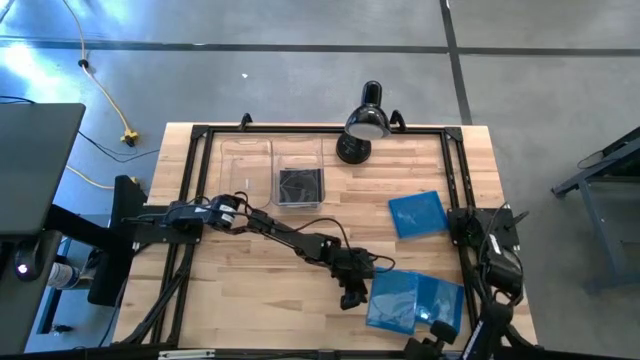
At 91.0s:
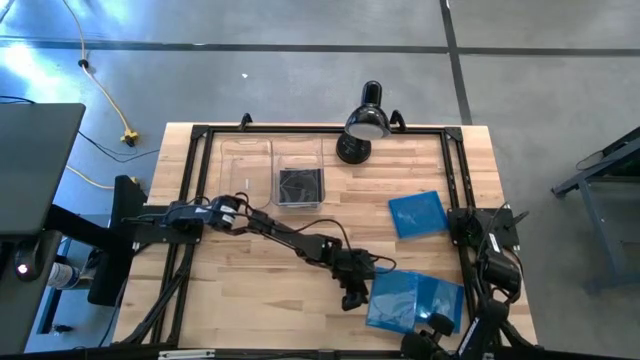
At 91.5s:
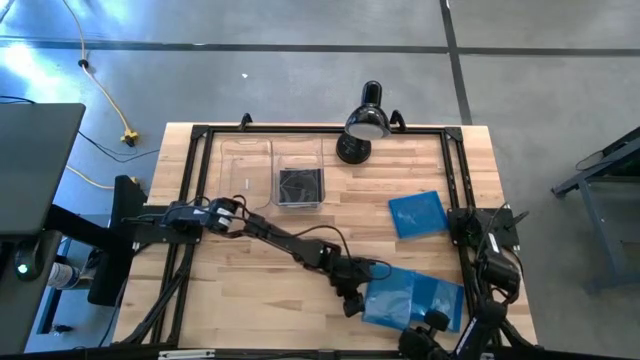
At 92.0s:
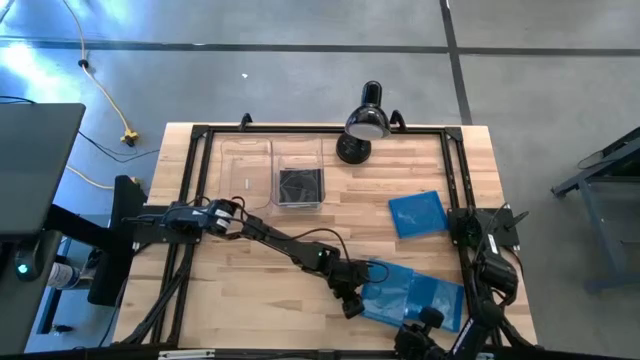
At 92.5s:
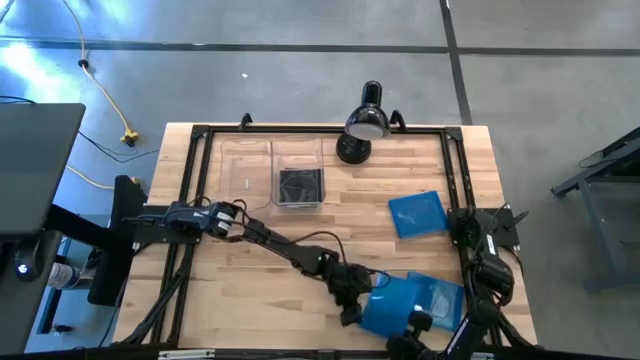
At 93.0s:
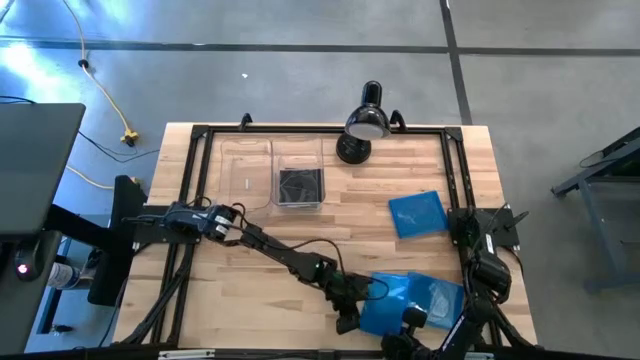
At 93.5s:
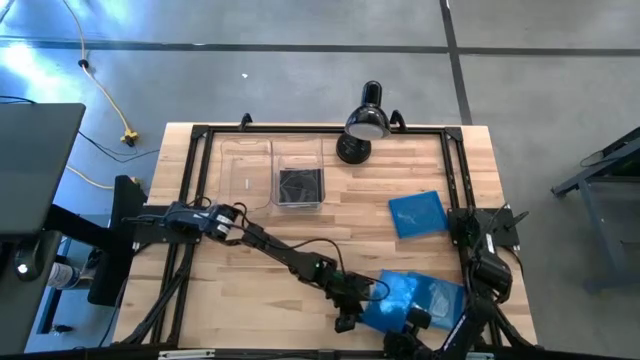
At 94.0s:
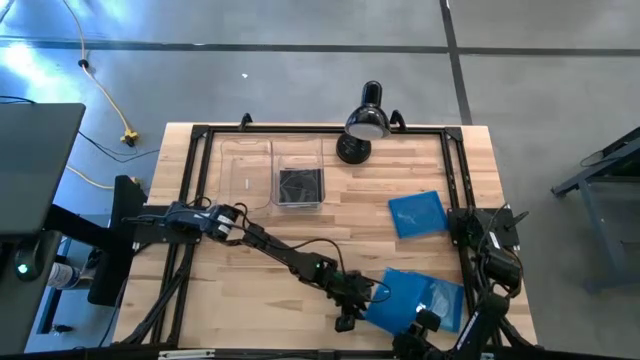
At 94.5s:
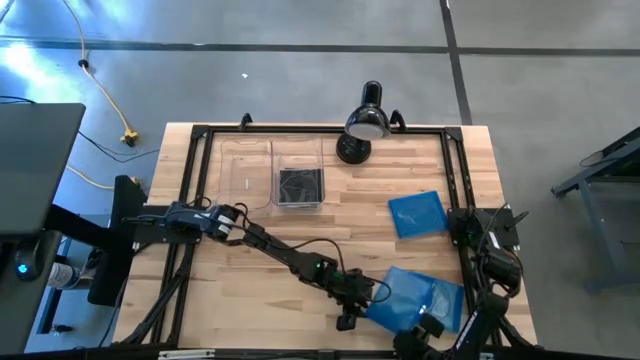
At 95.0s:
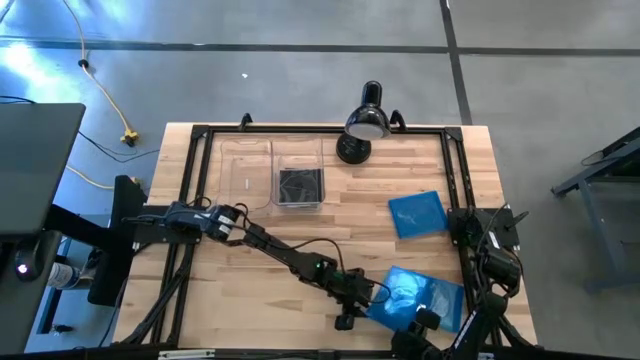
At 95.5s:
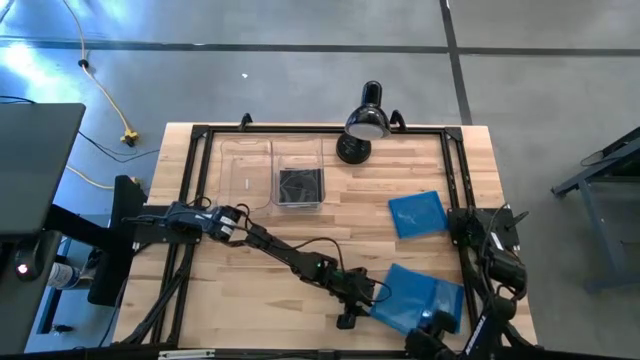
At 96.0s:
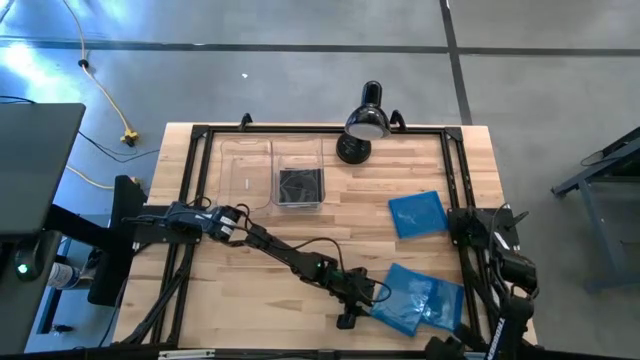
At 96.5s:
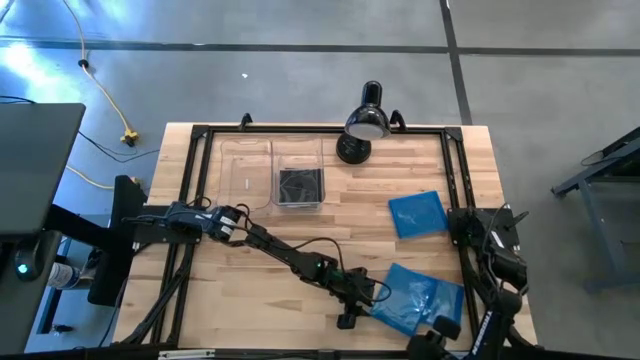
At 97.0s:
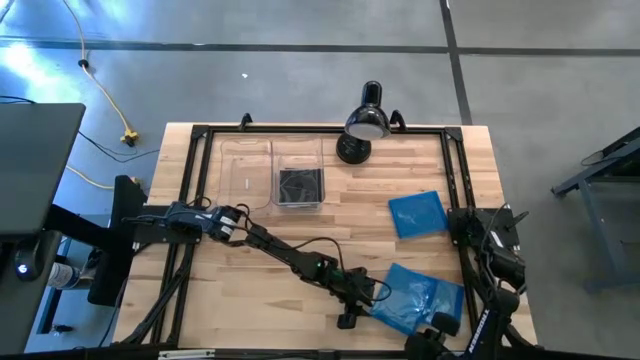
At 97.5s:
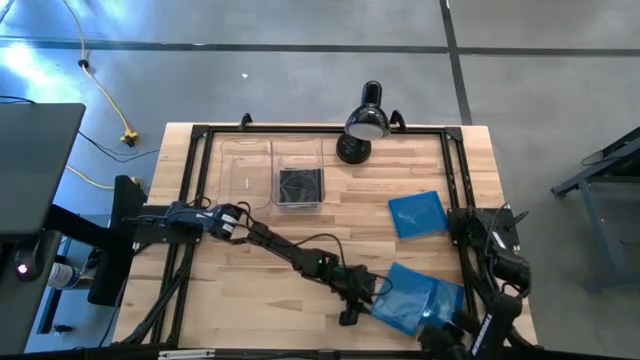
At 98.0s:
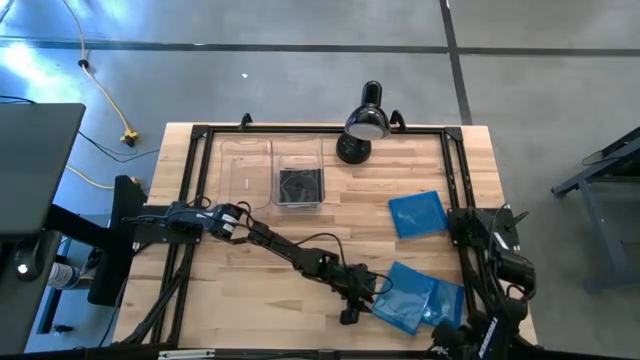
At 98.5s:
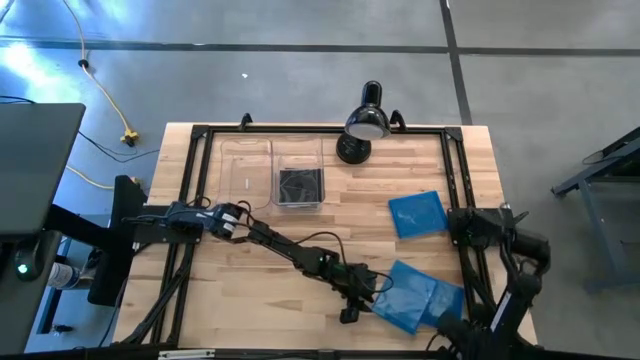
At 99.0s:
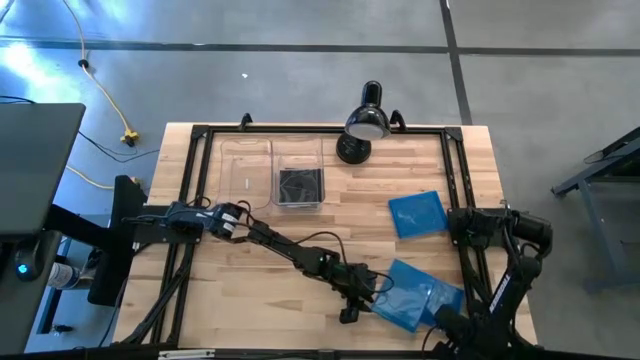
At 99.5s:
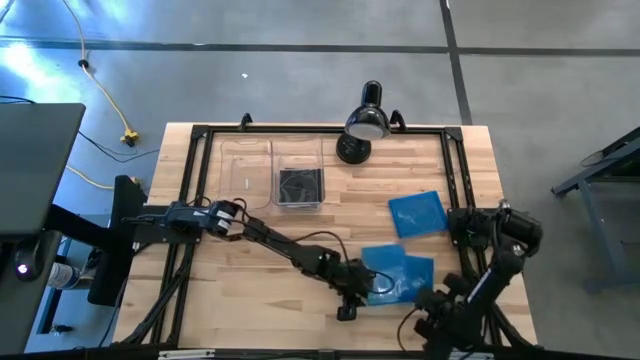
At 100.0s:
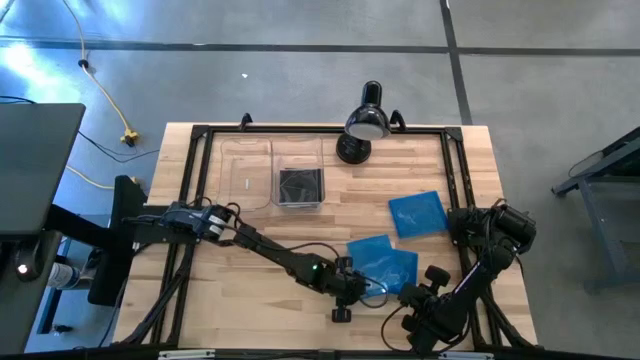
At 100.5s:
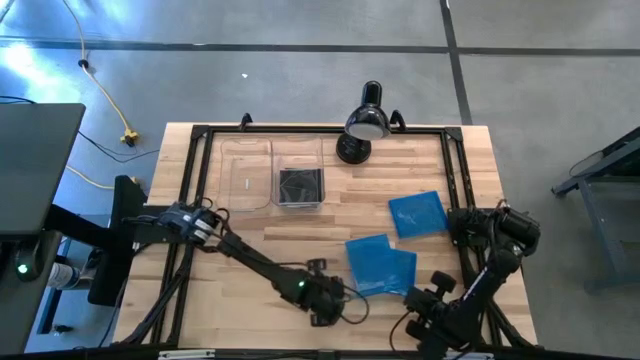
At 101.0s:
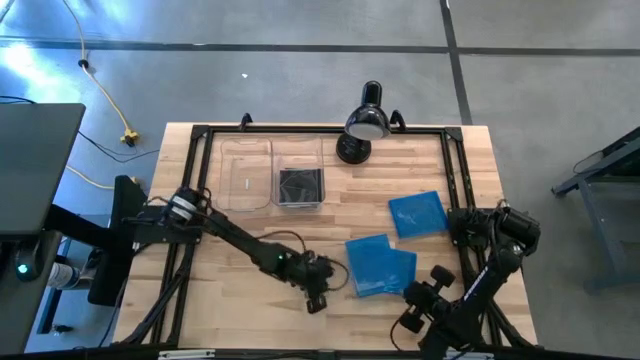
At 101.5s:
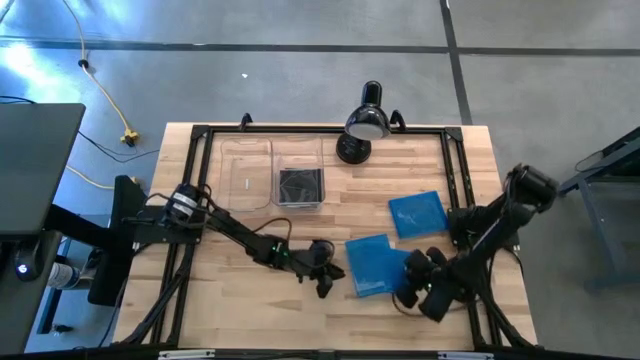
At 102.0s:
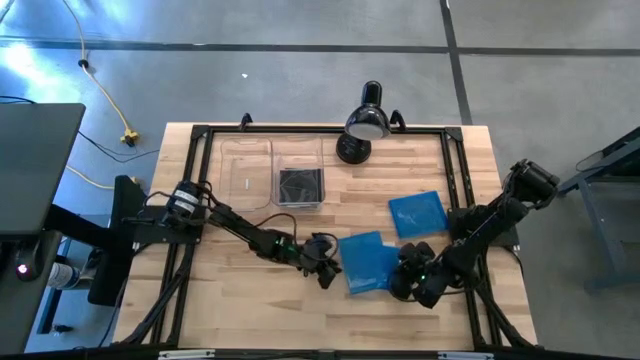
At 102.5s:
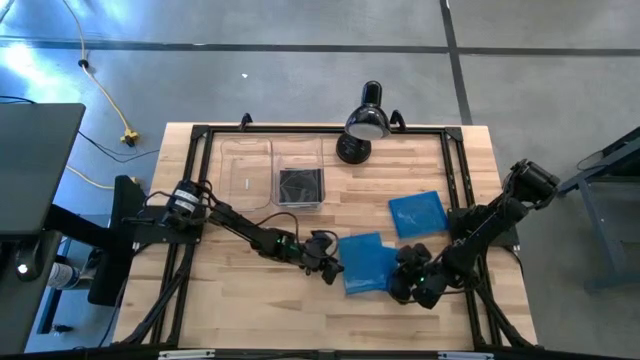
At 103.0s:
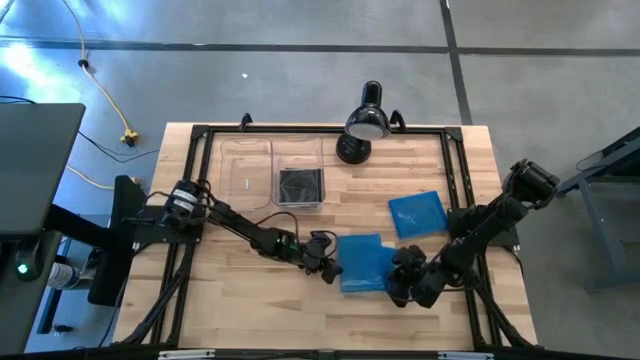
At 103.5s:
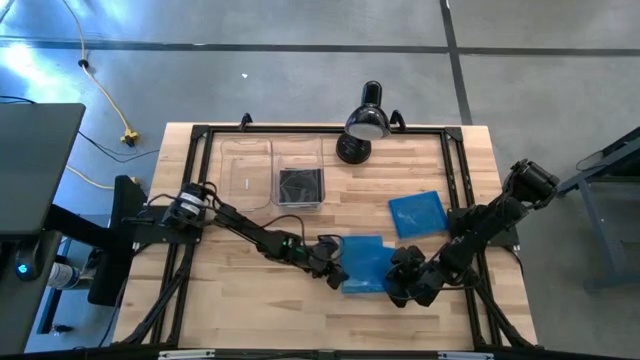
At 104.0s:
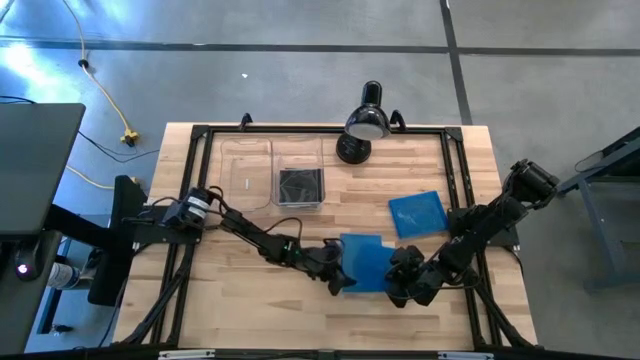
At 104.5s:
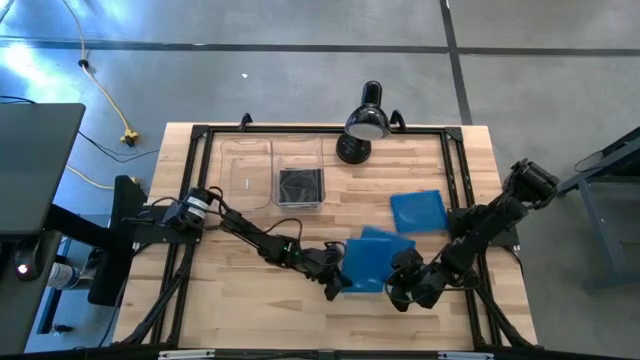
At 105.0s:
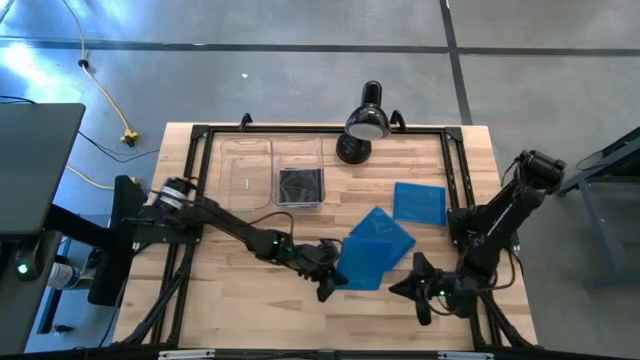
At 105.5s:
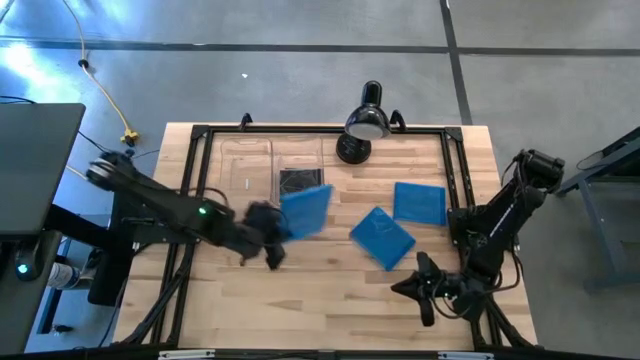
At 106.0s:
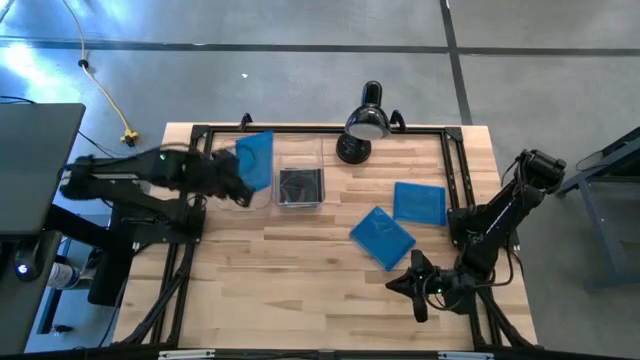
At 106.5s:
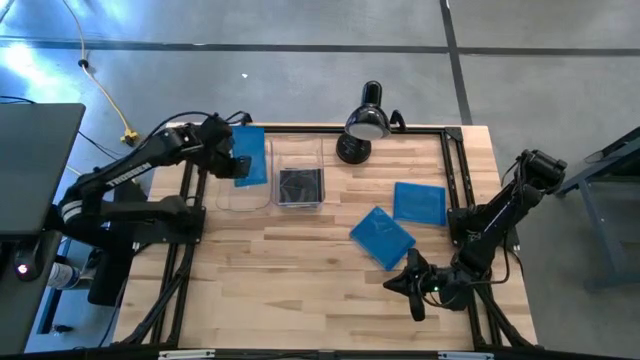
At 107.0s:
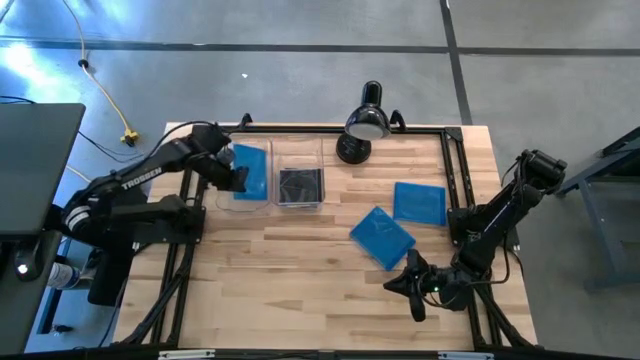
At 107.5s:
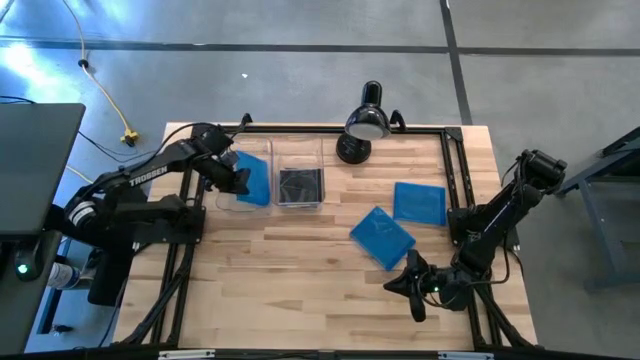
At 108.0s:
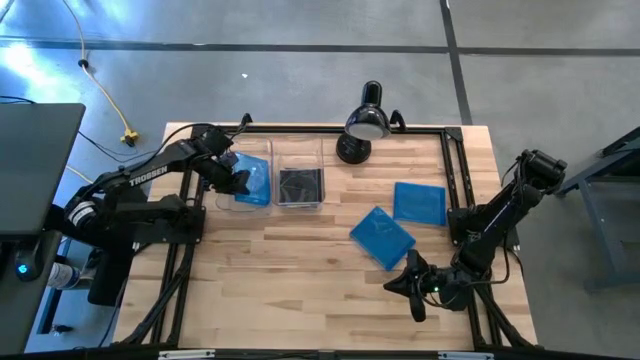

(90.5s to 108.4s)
Task: Pick & place jewel cases by type
Put the left blue CD case into the left transparent bin

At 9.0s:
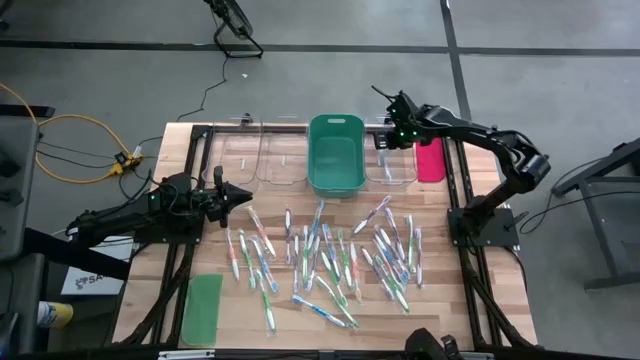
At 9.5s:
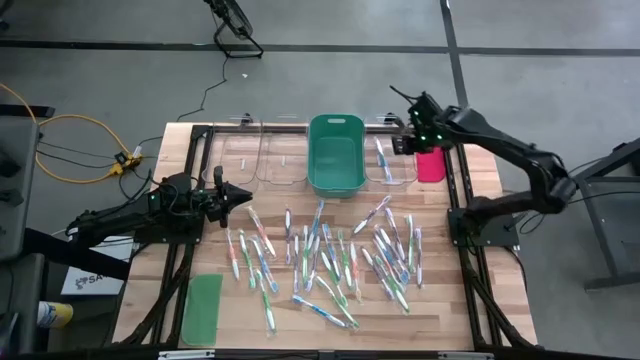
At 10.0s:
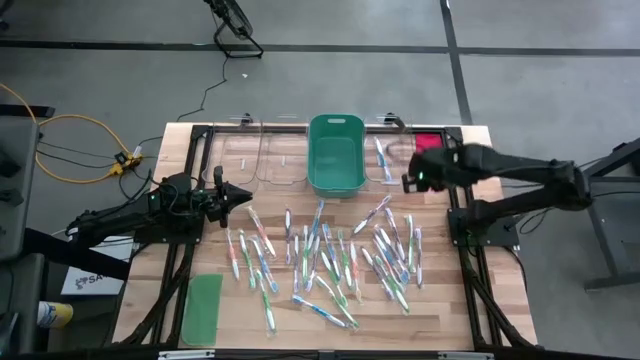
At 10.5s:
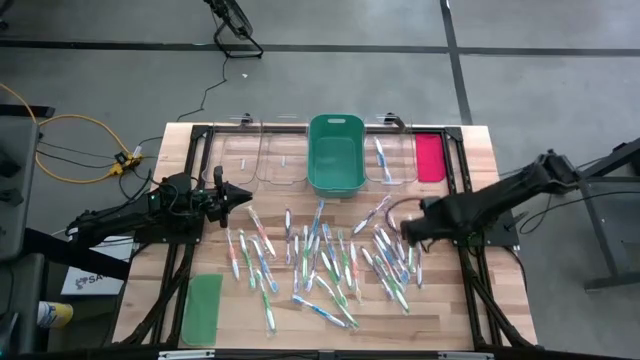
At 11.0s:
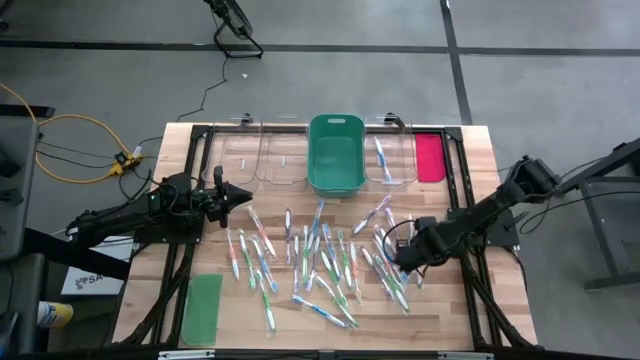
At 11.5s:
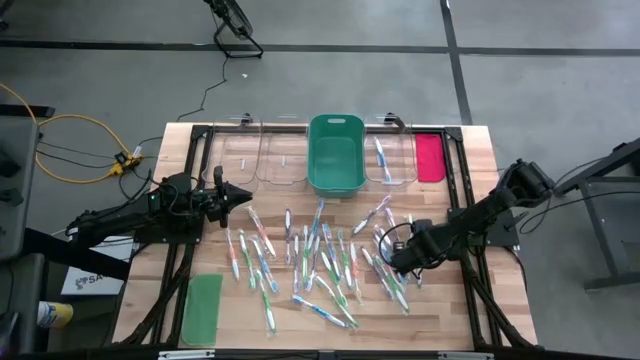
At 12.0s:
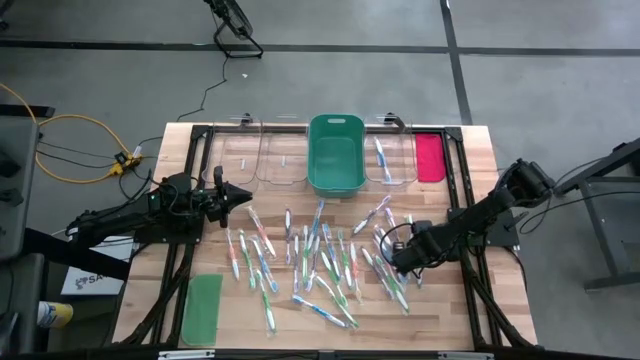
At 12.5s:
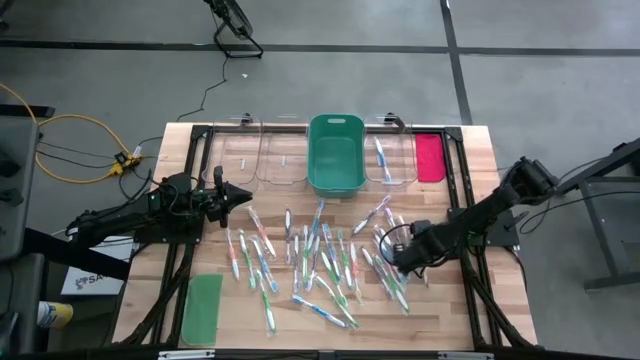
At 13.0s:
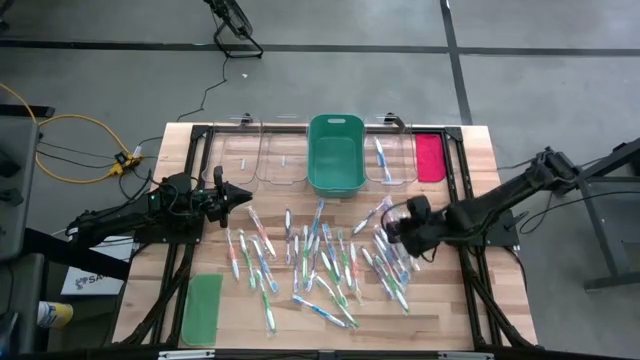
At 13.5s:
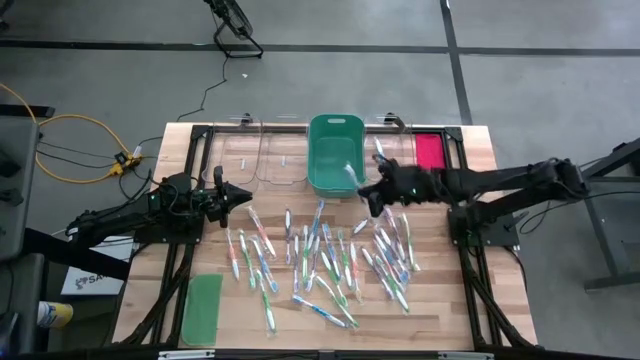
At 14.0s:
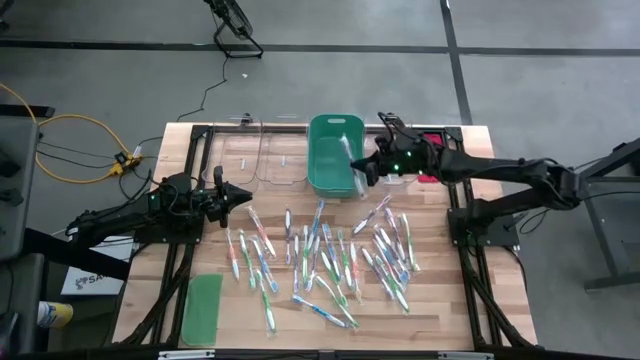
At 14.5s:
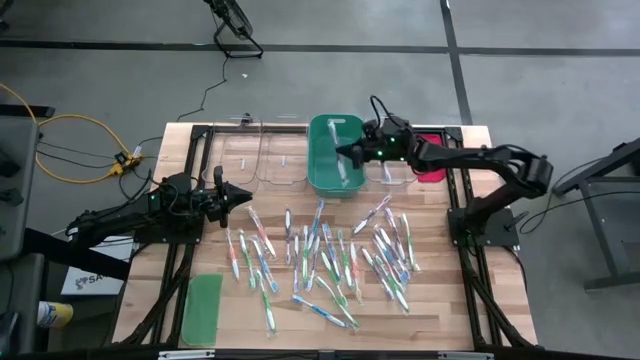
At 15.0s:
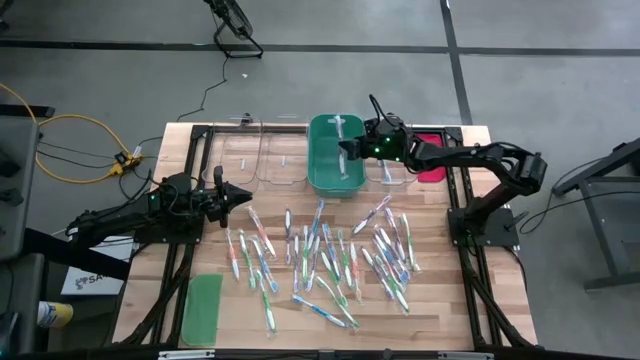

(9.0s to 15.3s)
Task: Pick & Place Toothbrushes
Put the purple toothbrush into the green bin
